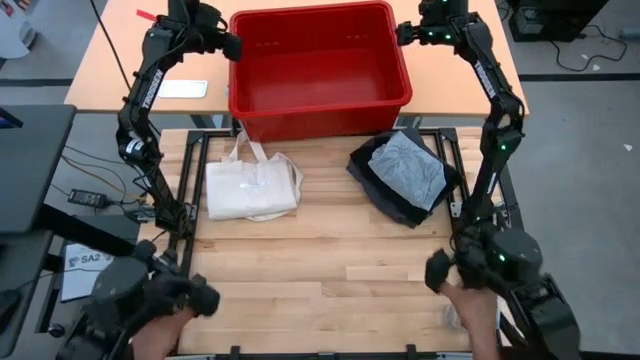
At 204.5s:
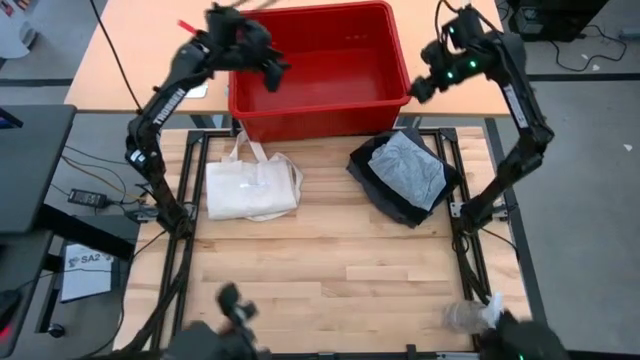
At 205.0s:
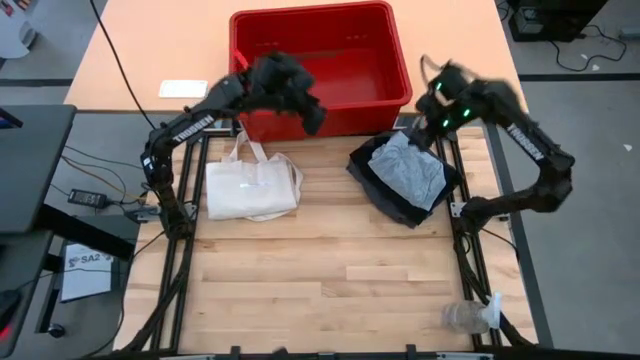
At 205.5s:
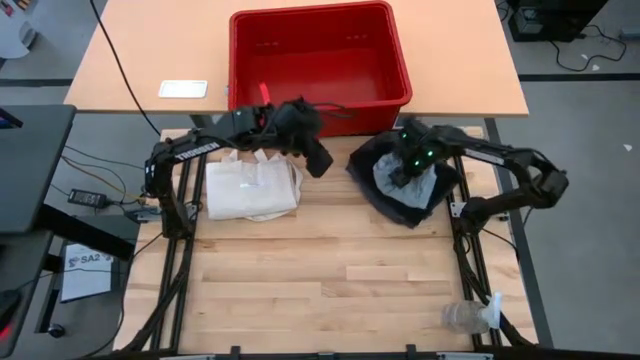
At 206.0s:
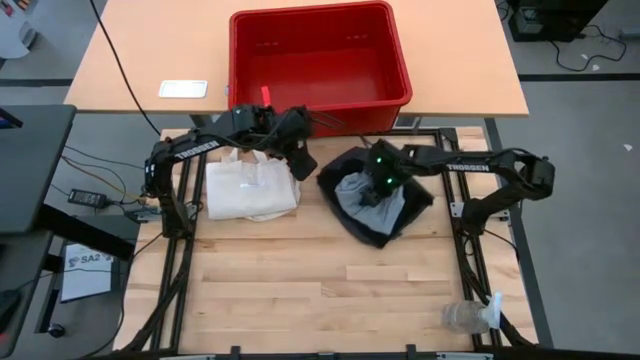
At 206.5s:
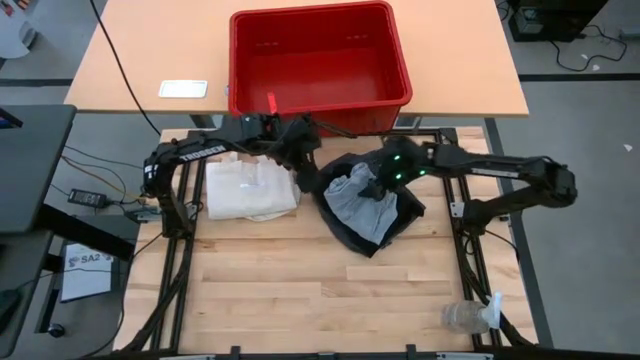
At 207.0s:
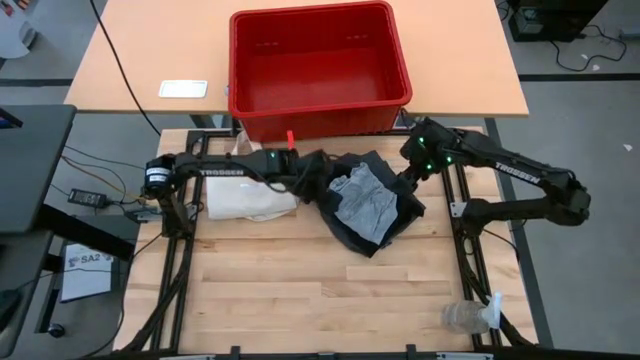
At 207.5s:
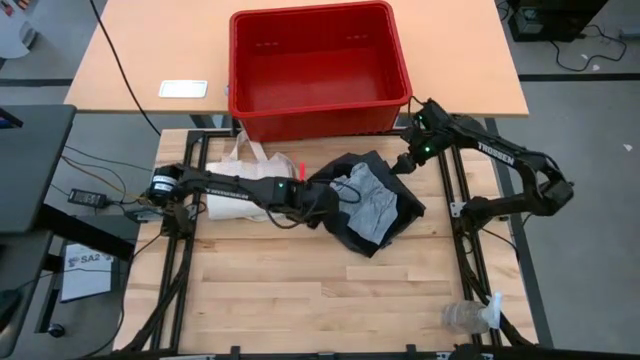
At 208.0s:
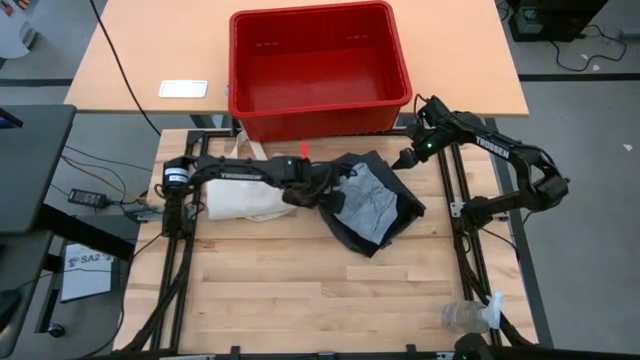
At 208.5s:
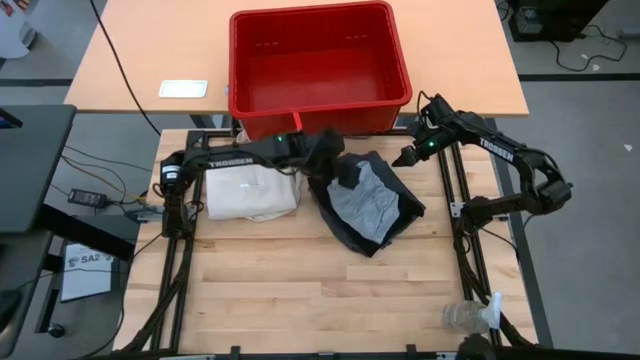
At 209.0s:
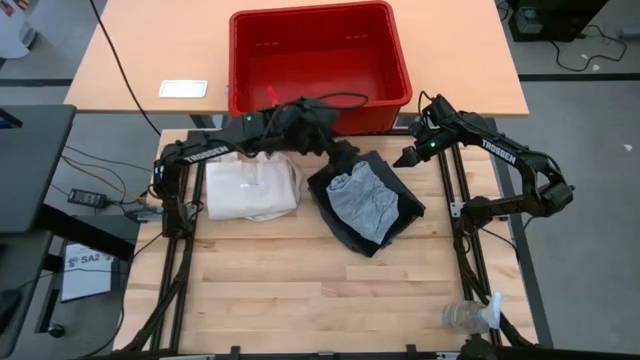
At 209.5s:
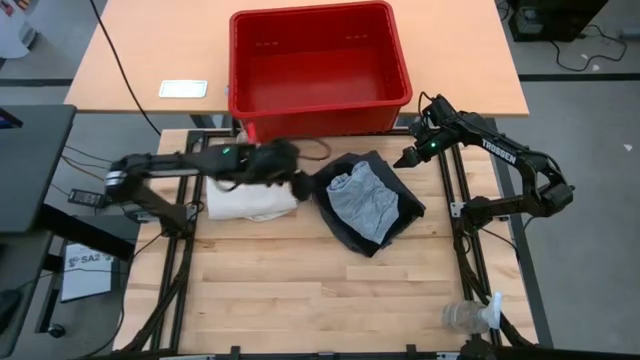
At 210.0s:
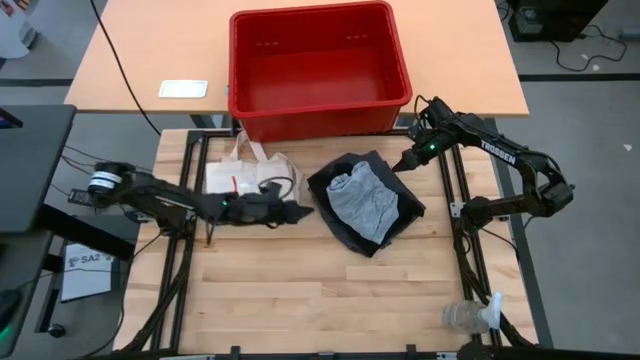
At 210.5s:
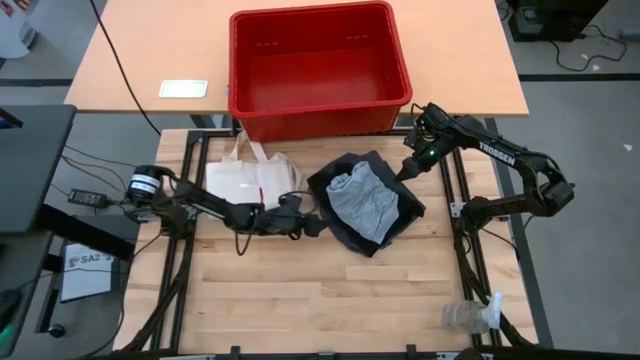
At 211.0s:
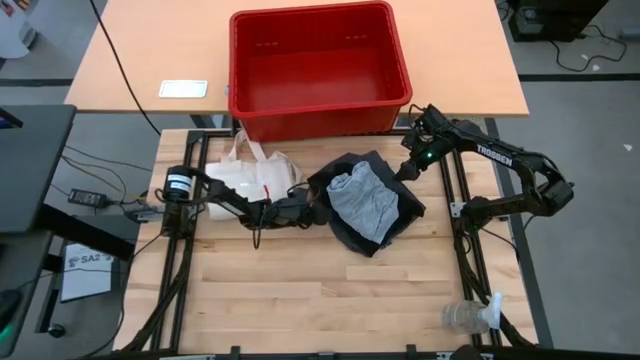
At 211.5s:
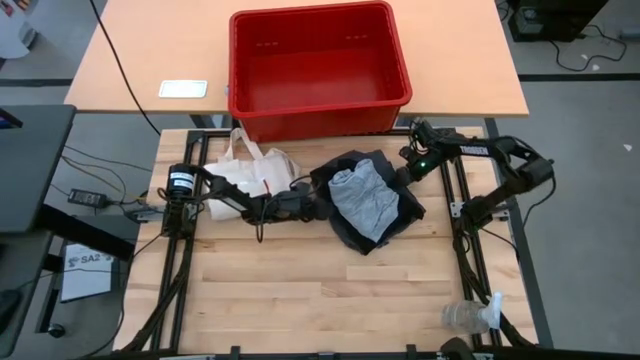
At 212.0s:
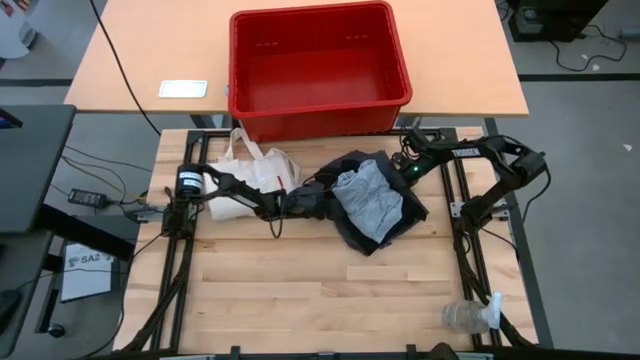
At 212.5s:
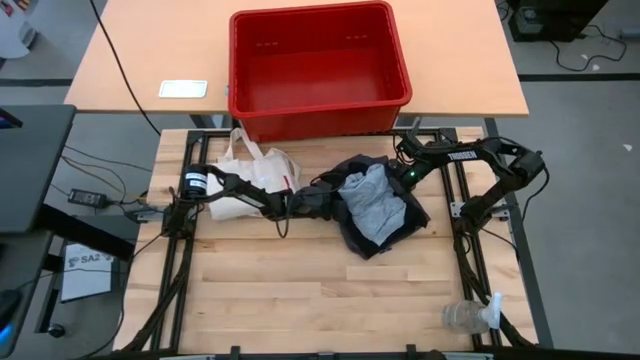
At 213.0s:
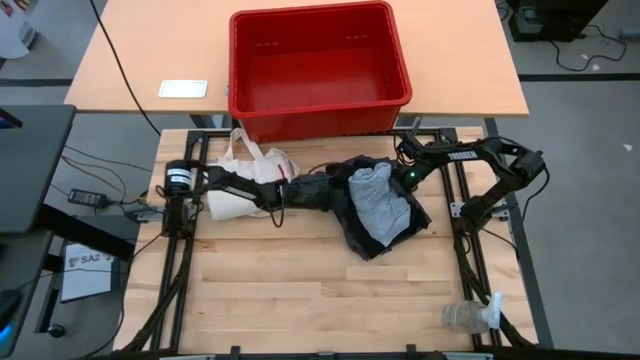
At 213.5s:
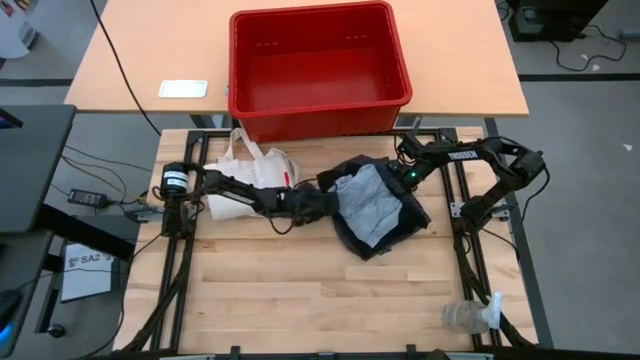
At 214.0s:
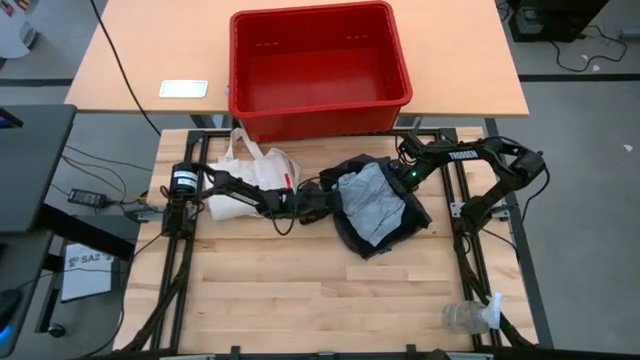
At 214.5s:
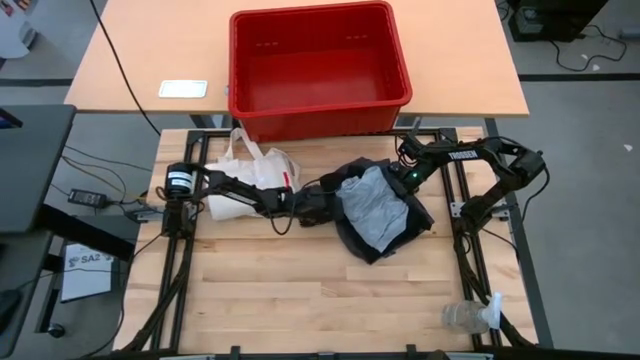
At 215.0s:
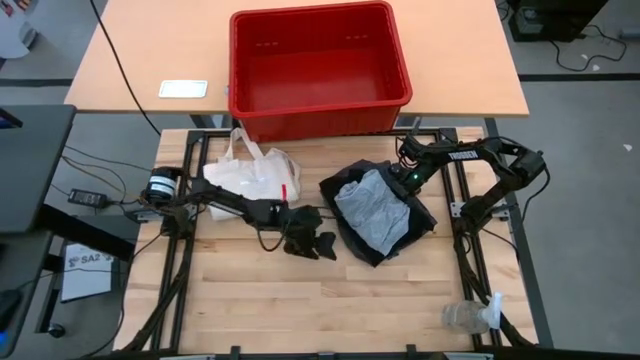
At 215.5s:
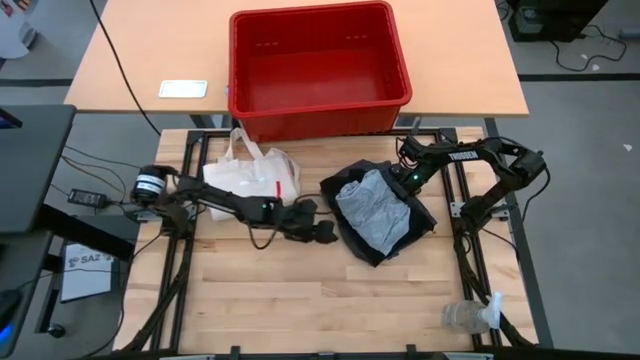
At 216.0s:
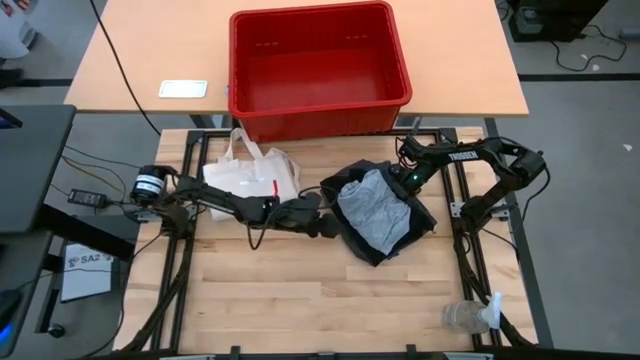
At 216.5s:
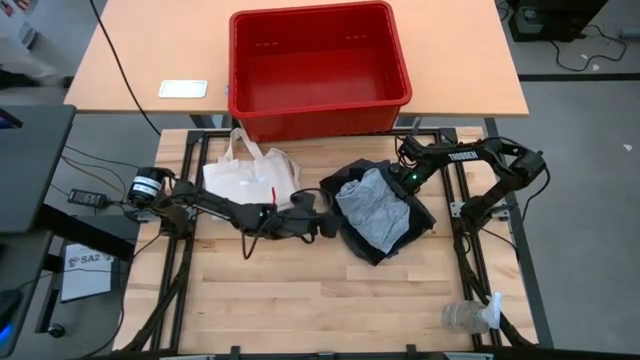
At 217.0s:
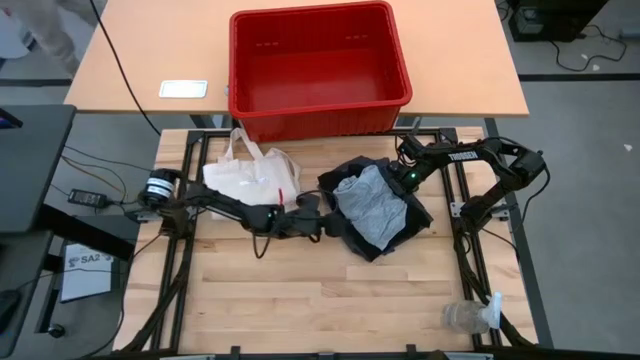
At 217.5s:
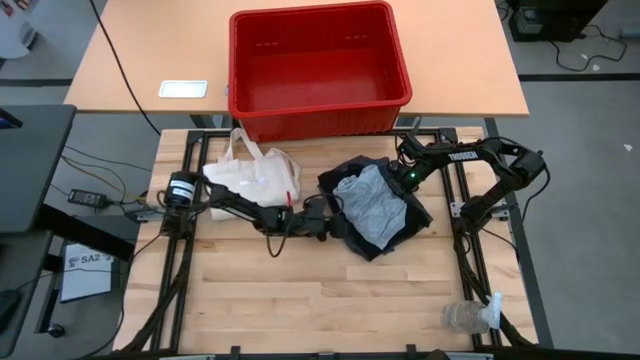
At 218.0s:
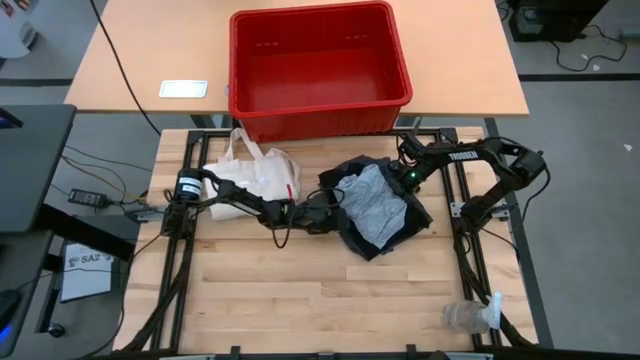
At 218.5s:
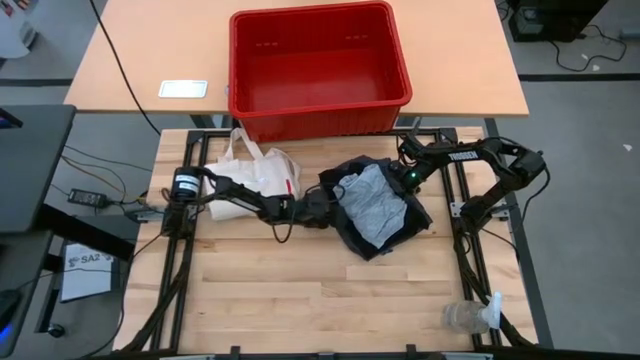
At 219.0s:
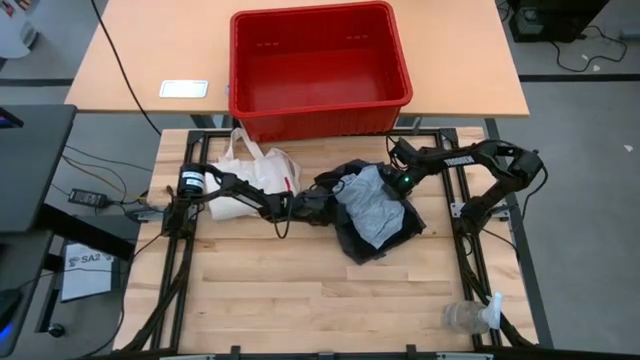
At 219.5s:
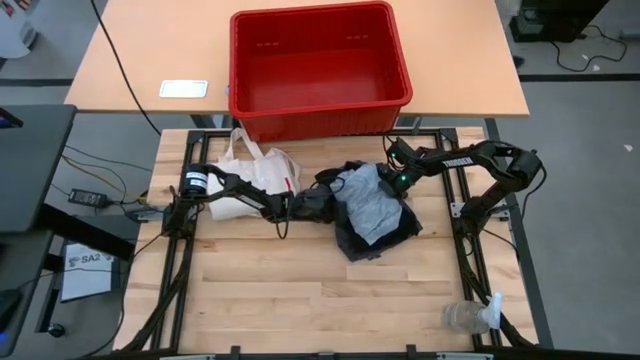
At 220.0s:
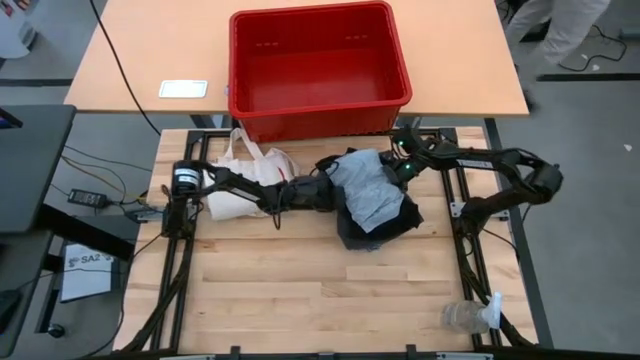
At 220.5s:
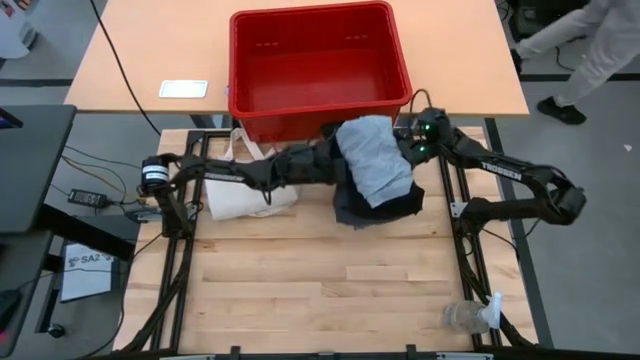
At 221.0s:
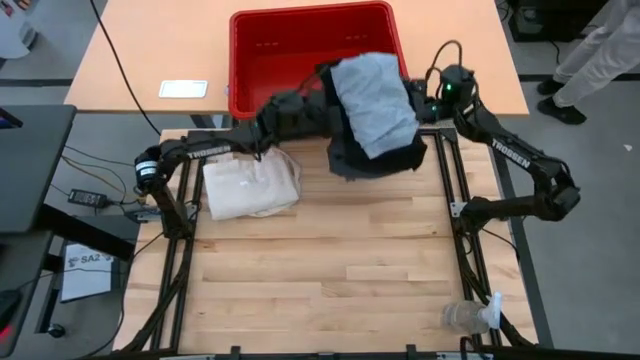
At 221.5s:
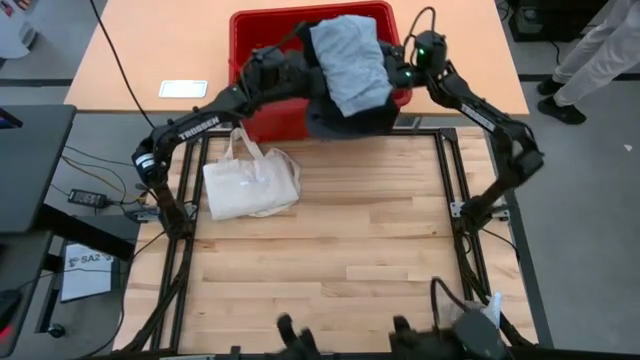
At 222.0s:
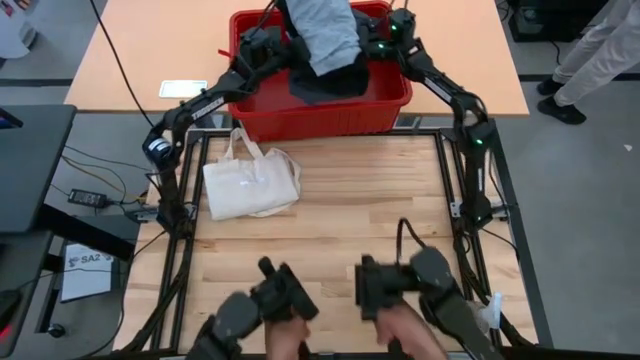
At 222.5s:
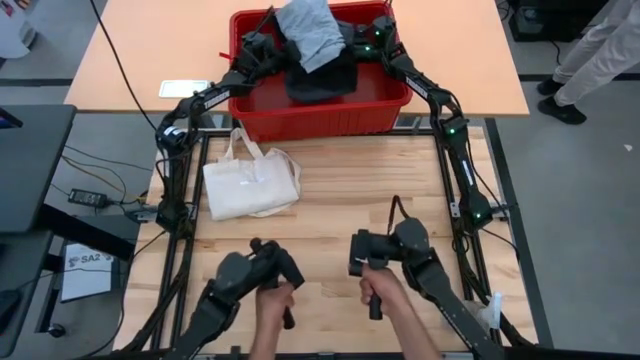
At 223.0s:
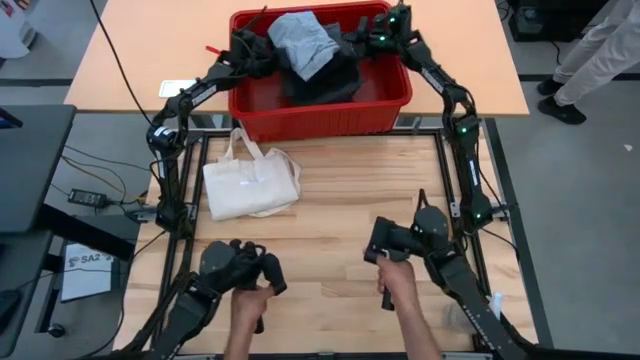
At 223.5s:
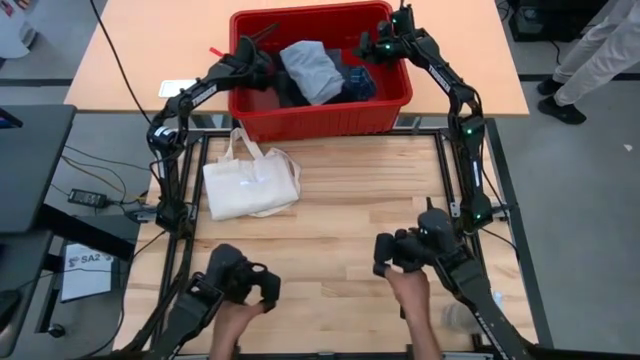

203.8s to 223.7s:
Task: Fold laundry
Put the folded clothes into the red bin

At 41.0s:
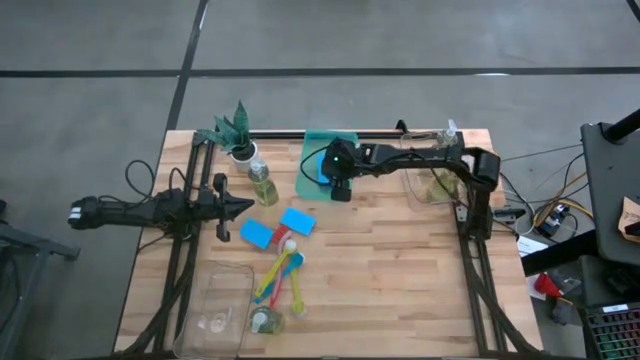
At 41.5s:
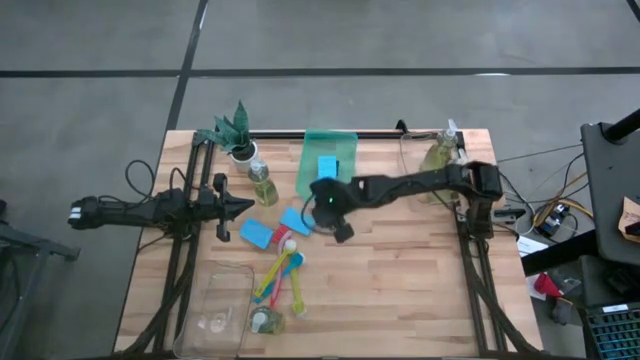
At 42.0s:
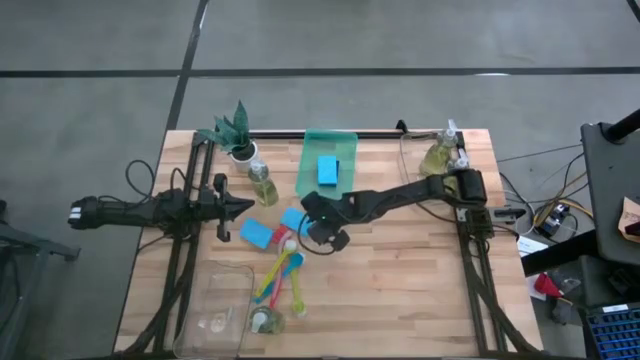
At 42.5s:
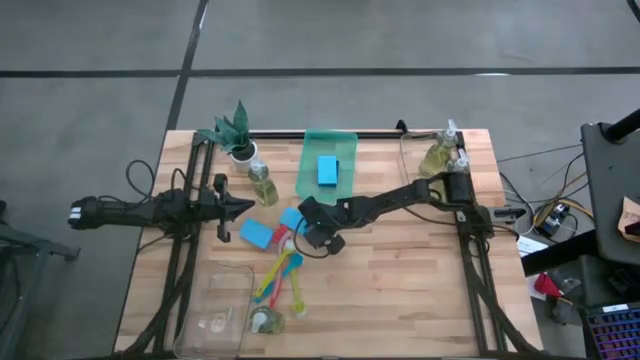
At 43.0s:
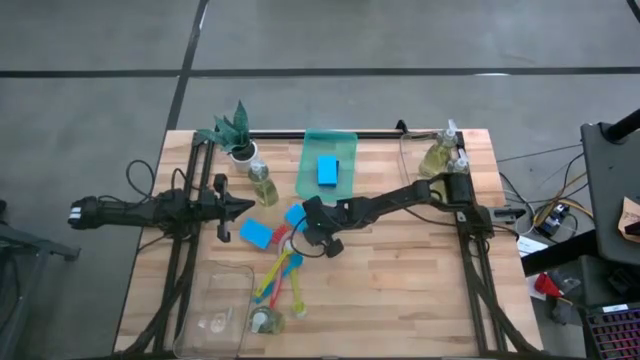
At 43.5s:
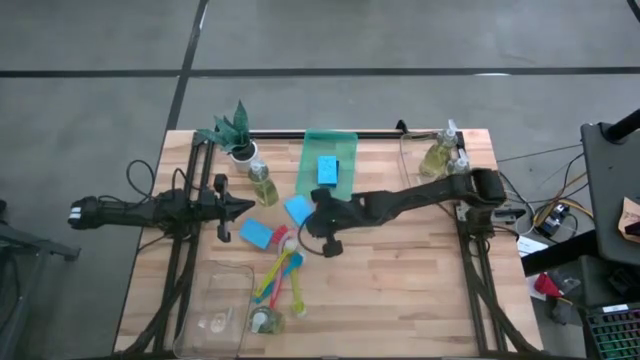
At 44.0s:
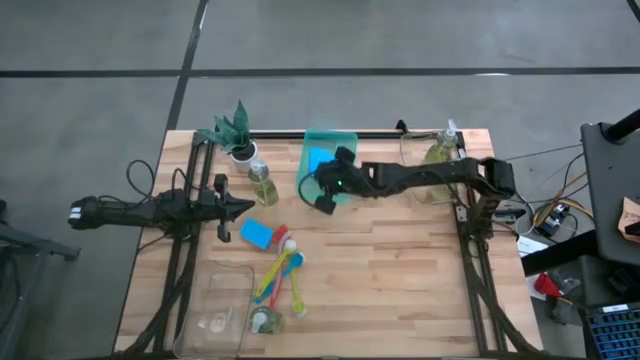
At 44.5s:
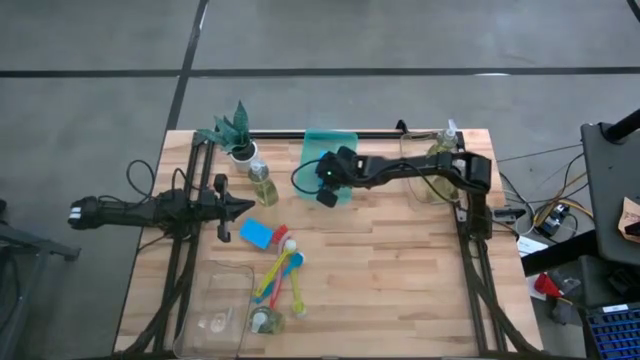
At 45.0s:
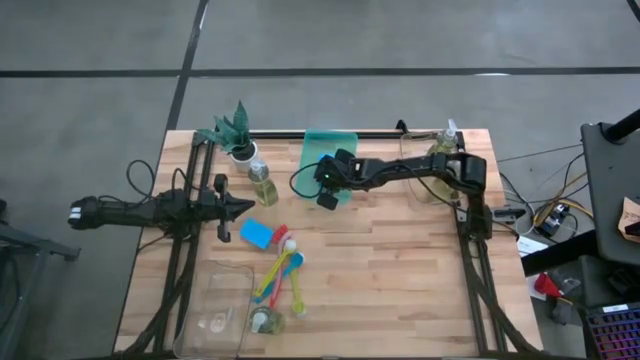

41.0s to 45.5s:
Task: Pick & Place Kitchen Sink Supplies
Put the blue sponge into the green bin
